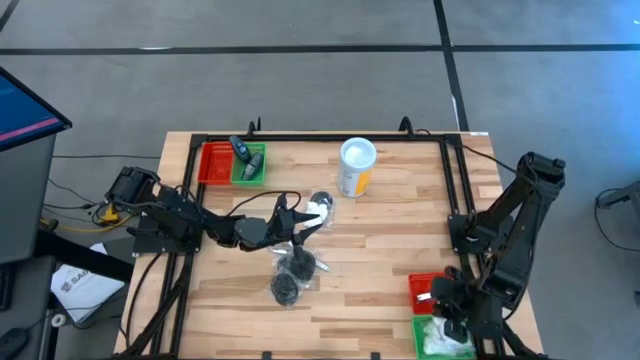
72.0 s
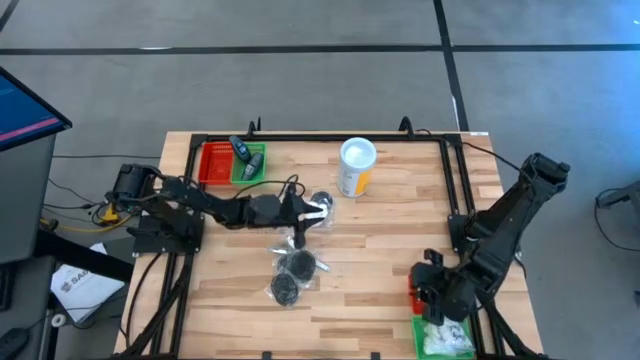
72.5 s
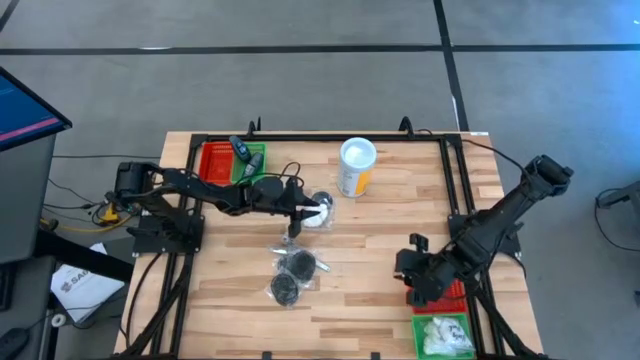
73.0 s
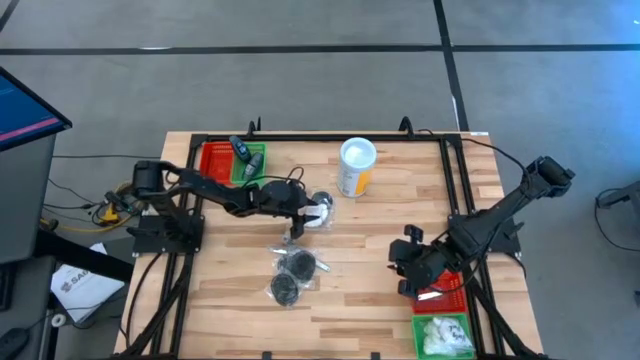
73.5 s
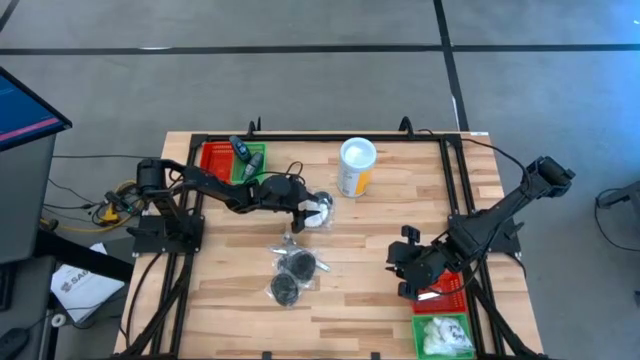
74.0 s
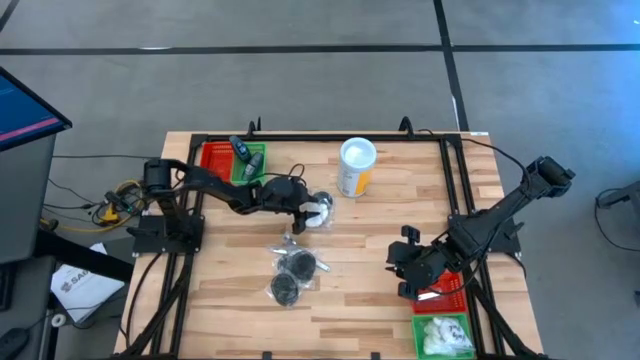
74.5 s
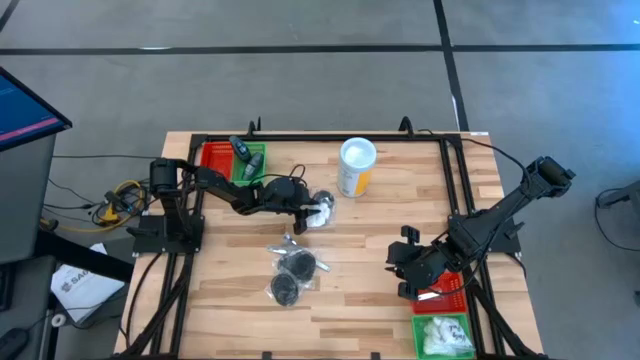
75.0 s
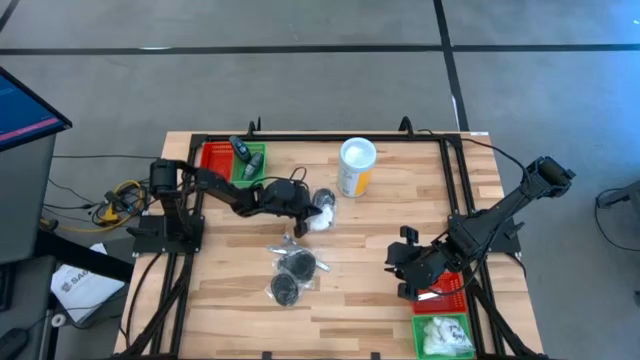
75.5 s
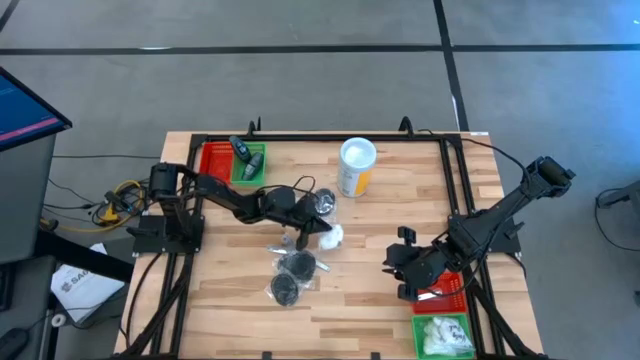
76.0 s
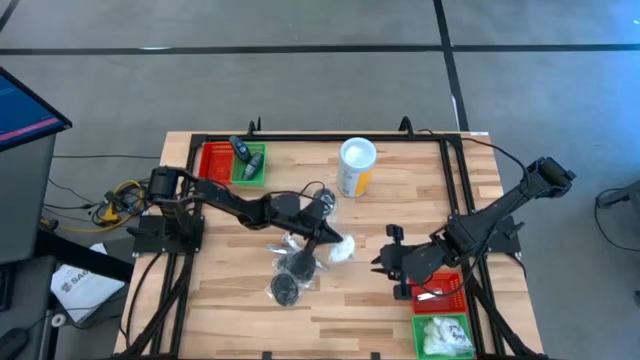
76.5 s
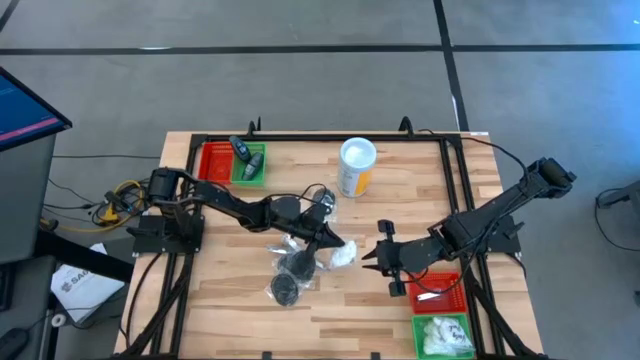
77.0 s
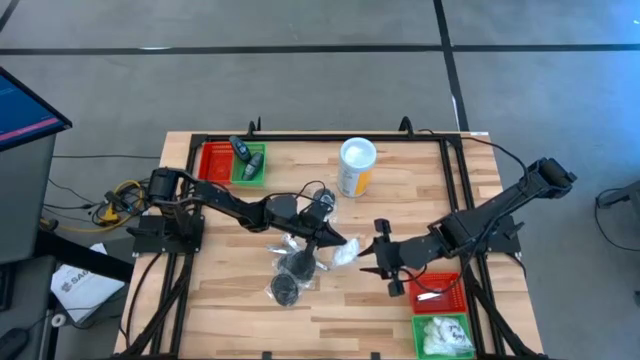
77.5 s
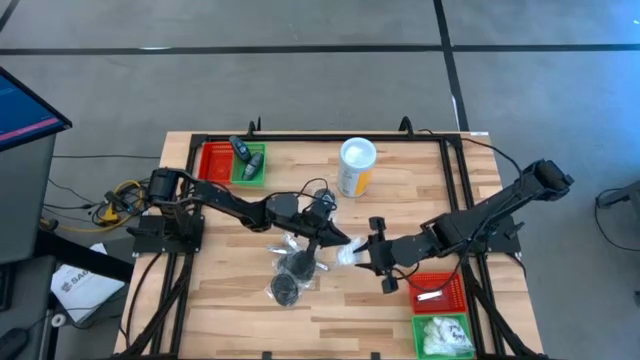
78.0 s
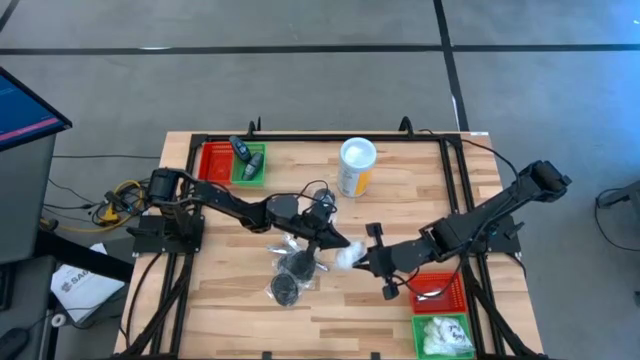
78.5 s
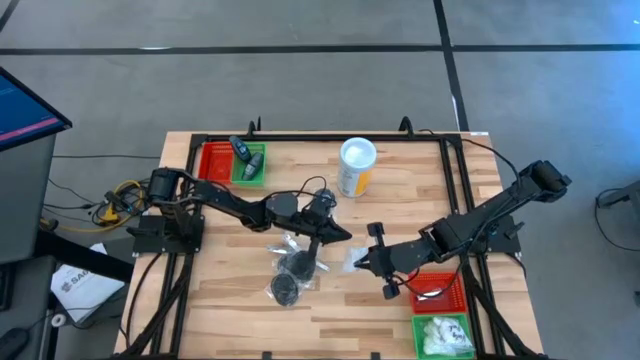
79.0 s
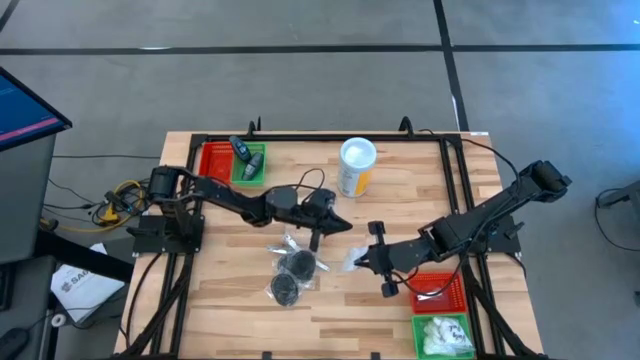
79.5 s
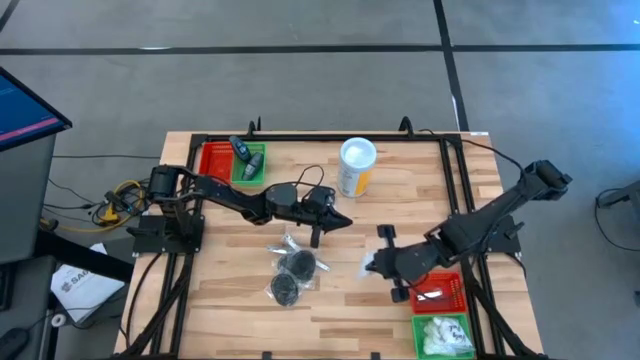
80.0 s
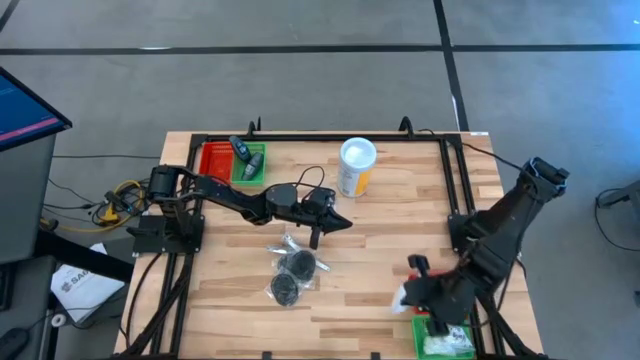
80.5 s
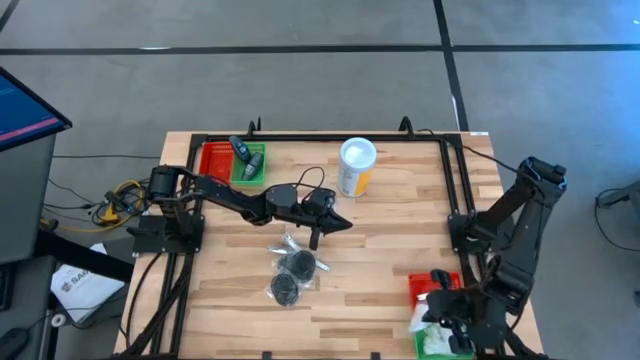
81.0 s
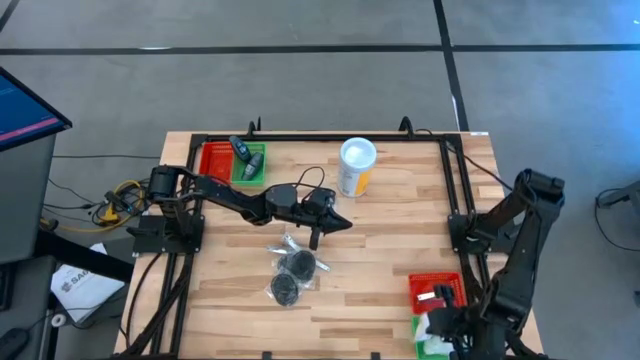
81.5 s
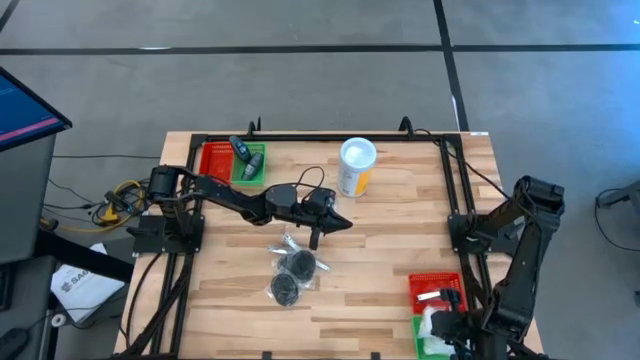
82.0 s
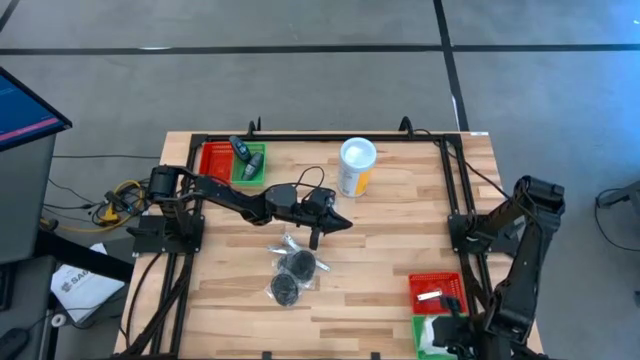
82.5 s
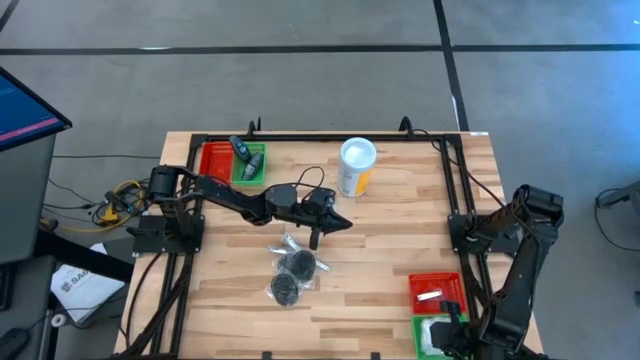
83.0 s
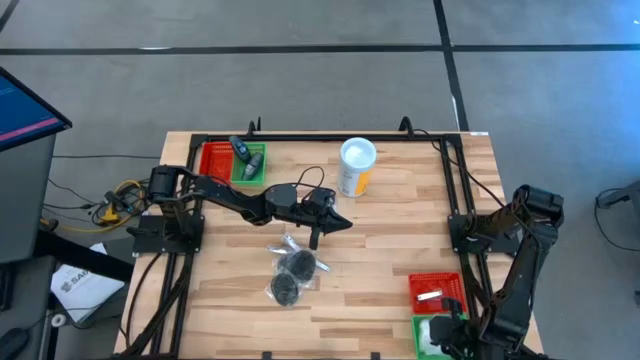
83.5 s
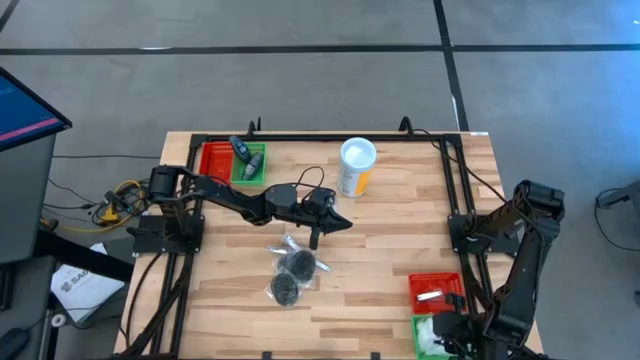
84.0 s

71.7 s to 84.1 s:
Task: Pick & Place Travel size toiletries
Put the white cotton pack into the bottom green bin

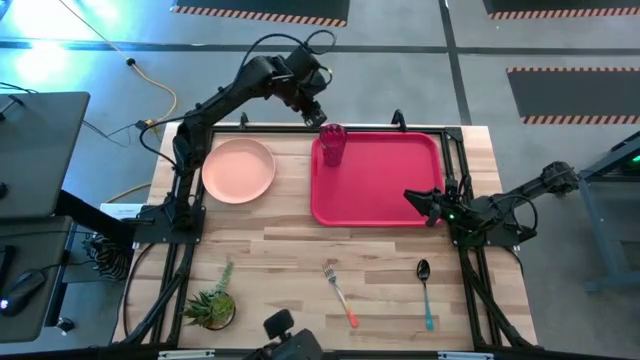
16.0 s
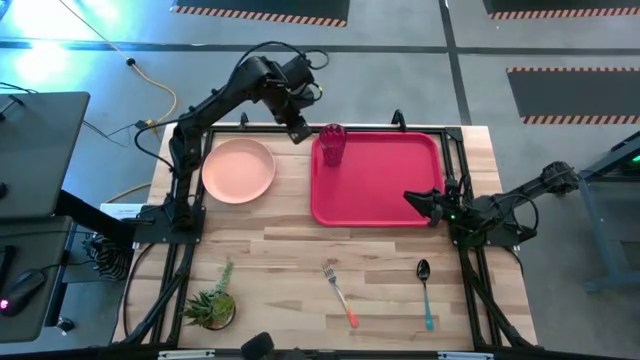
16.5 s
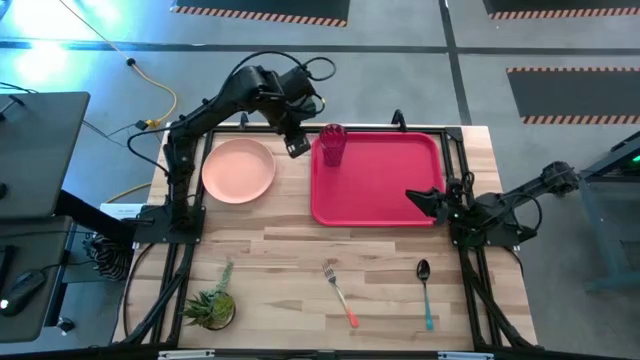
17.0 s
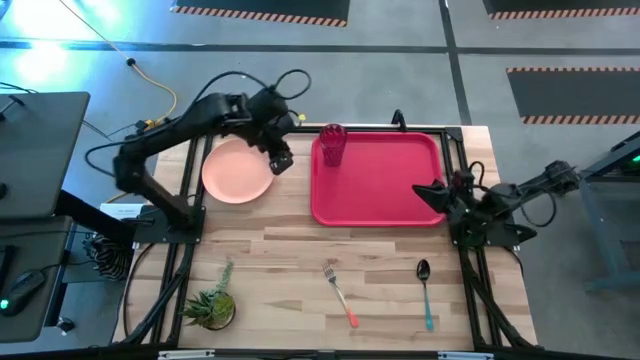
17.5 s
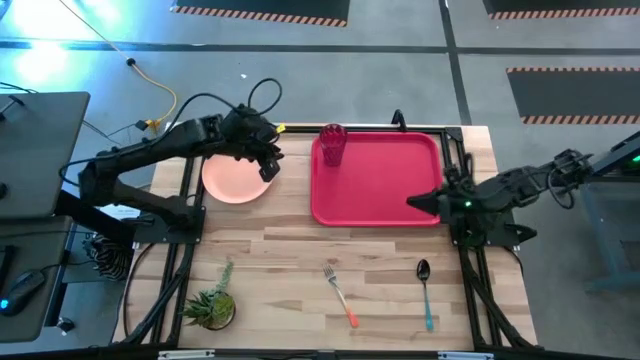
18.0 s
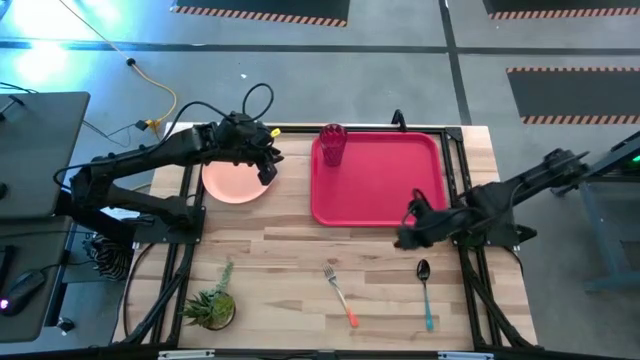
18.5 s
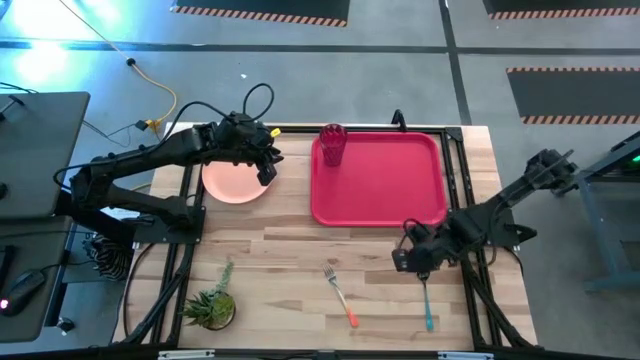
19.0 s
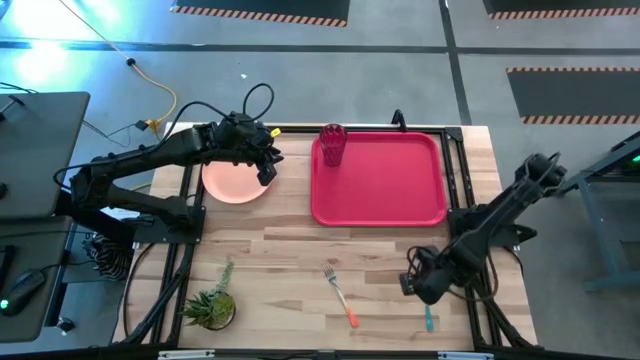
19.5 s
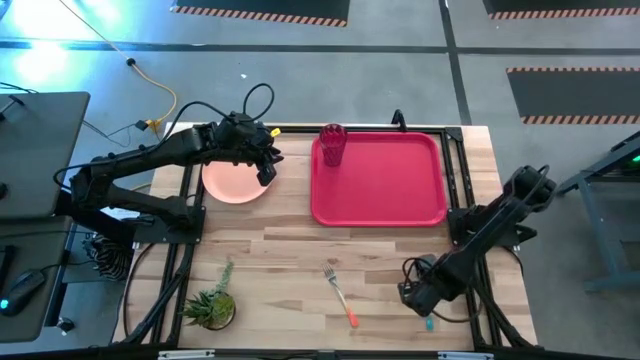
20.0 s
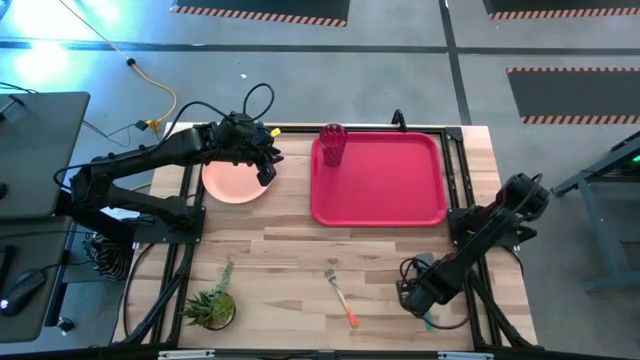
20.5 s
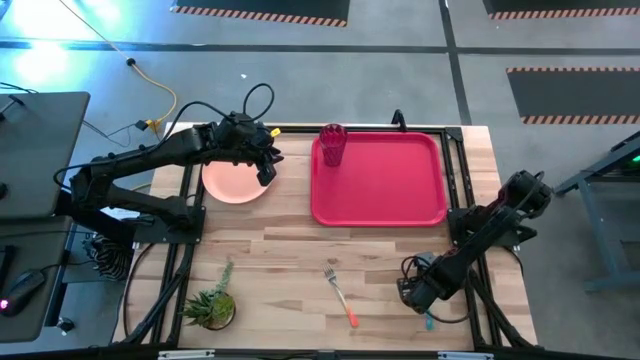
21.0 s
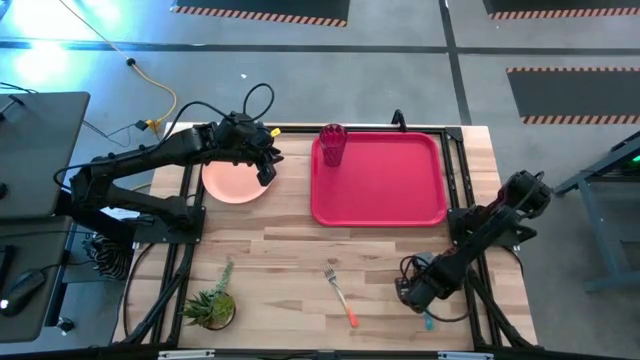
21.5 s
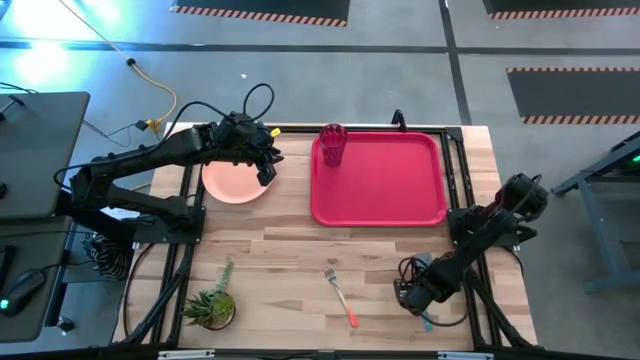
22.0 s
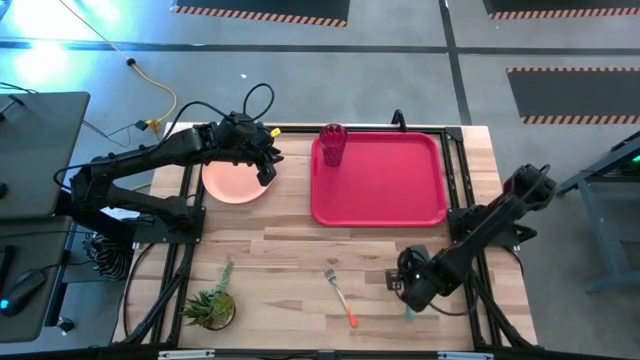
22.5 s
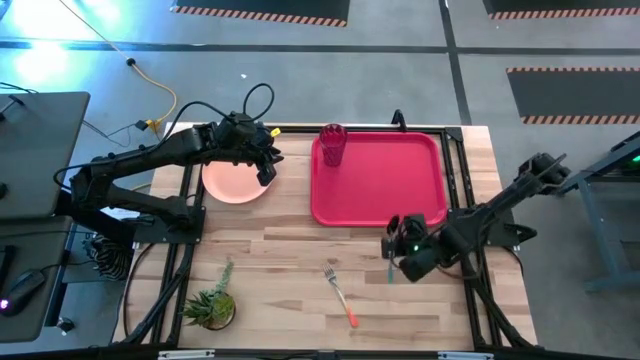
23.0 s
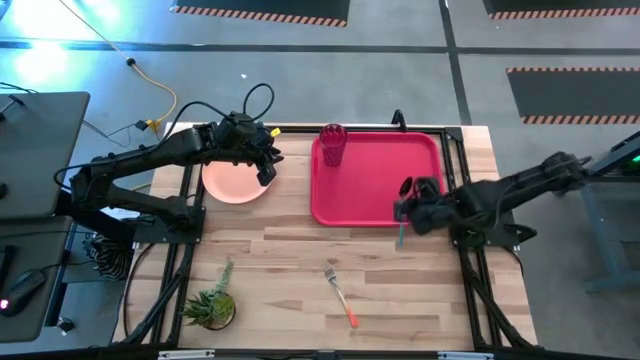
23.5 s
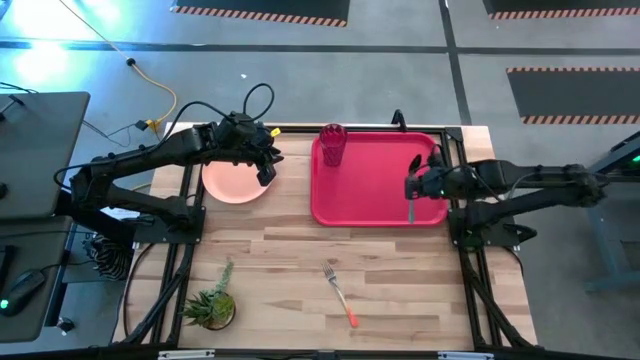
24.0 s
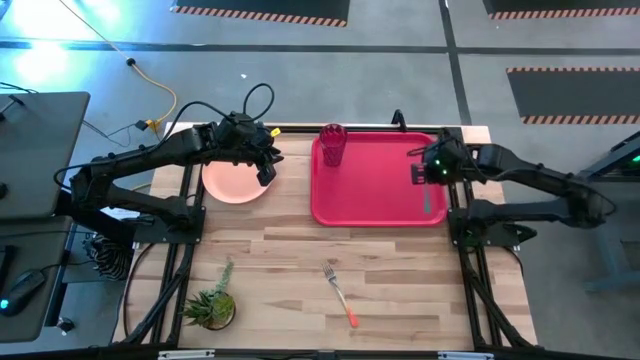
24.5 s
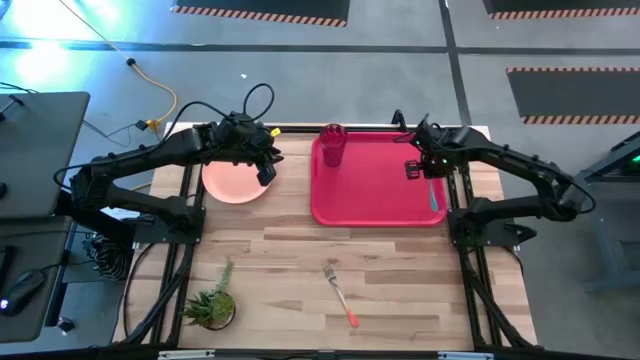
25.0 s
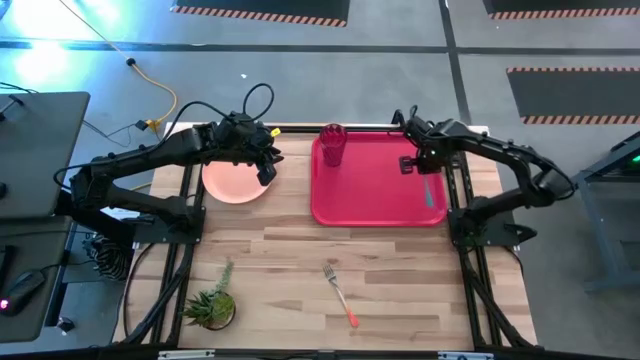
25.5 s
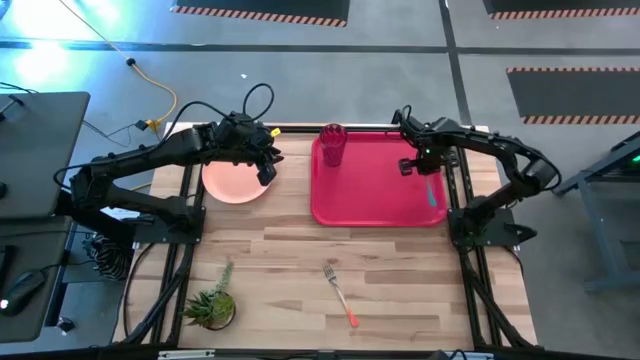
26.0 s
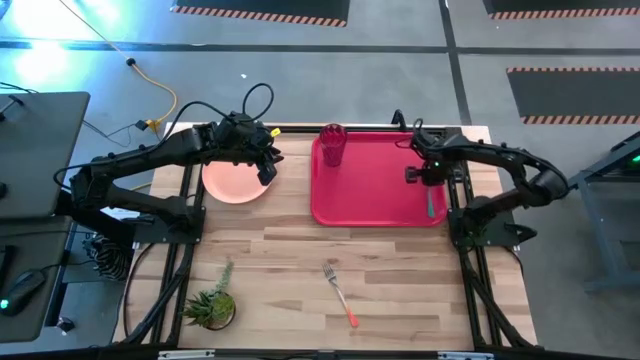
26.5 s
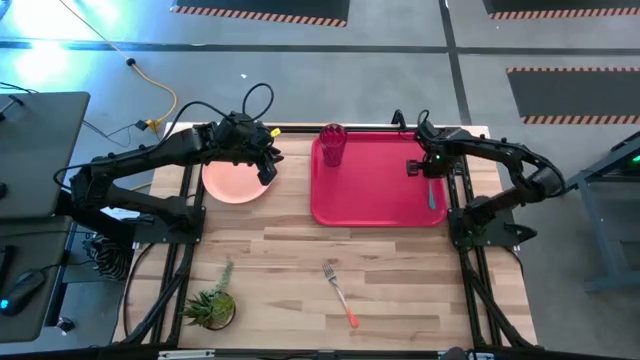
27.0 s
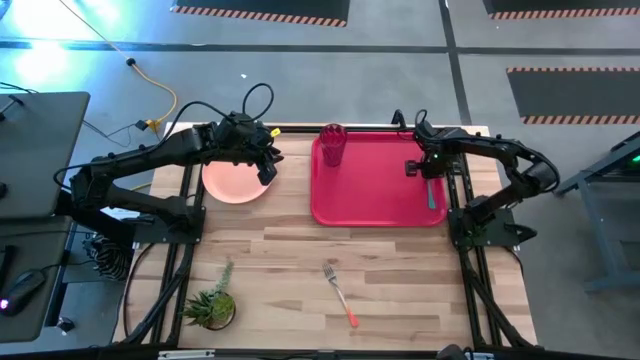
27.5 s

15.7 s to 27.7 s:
Task: Pick and place plate/cup/fork/spoon on tray
Put the blue spoon on the right side of the red tray
